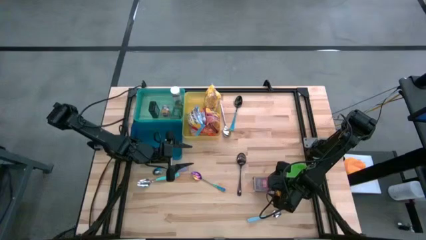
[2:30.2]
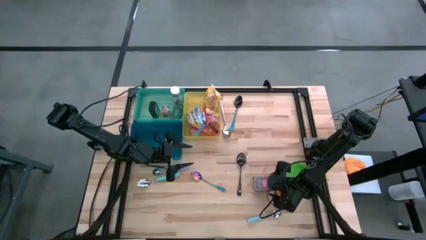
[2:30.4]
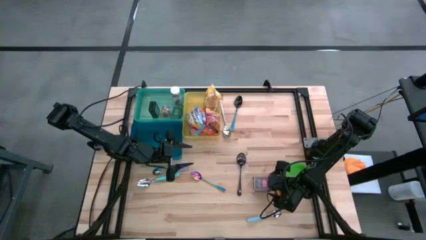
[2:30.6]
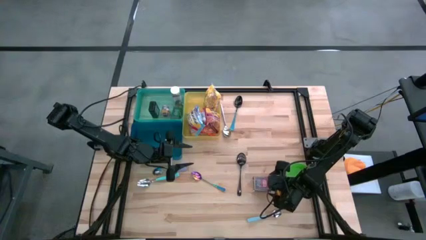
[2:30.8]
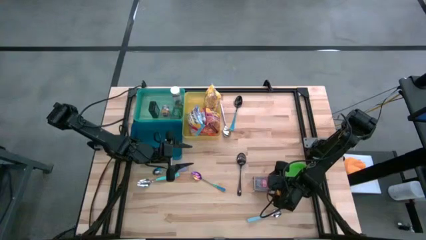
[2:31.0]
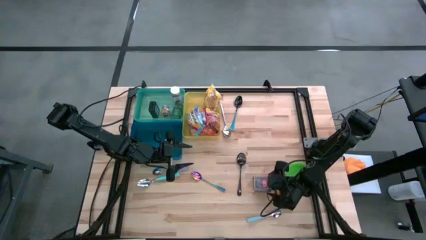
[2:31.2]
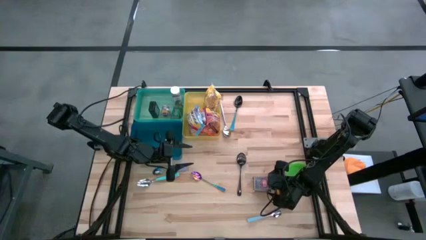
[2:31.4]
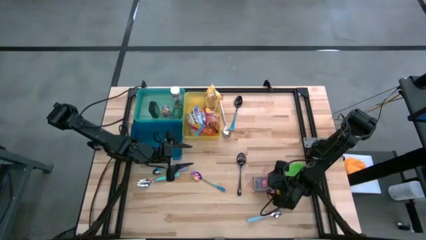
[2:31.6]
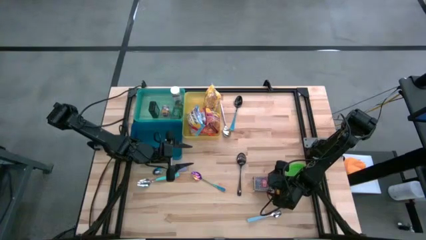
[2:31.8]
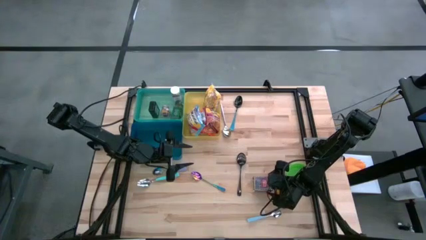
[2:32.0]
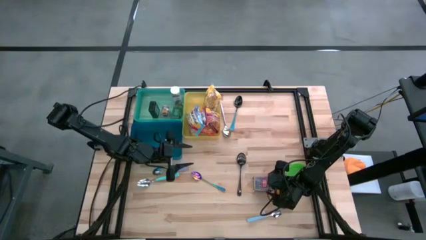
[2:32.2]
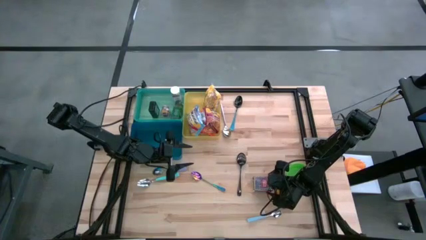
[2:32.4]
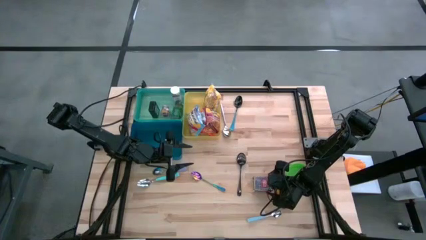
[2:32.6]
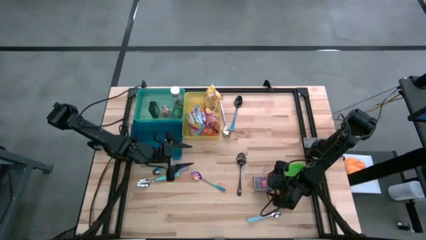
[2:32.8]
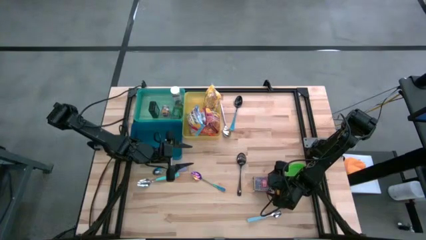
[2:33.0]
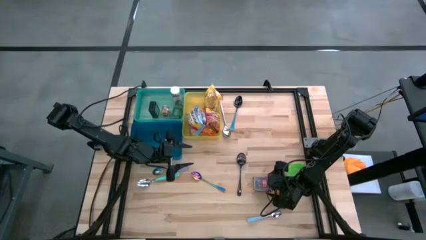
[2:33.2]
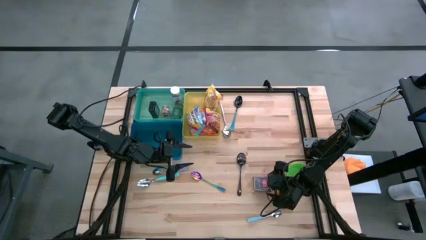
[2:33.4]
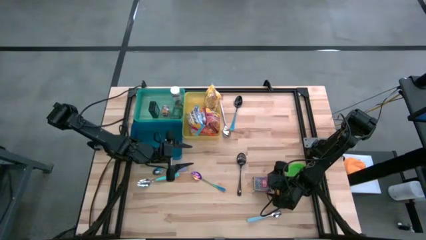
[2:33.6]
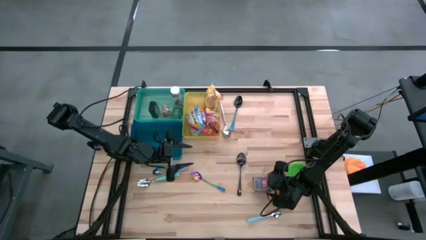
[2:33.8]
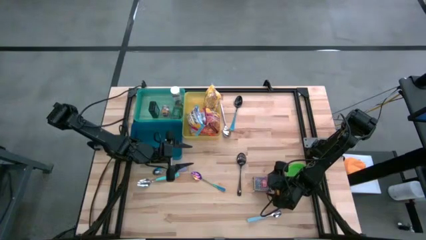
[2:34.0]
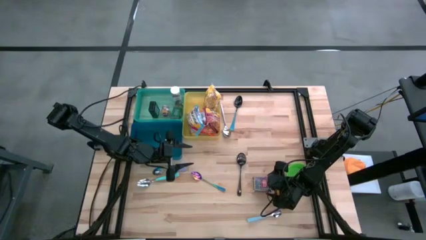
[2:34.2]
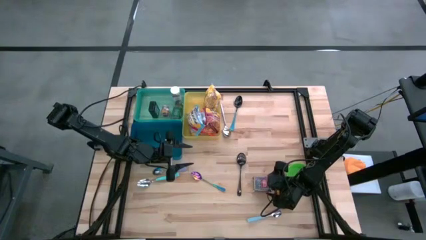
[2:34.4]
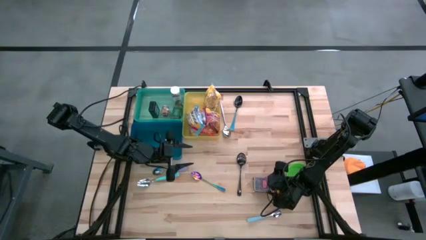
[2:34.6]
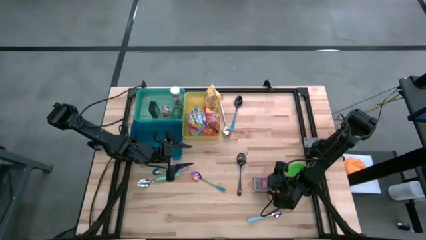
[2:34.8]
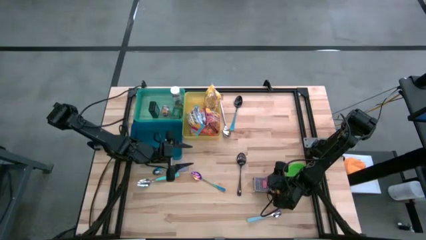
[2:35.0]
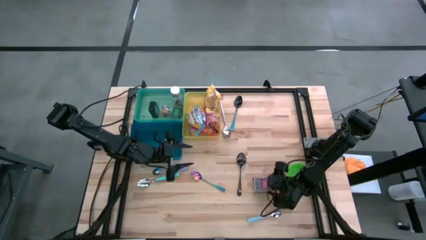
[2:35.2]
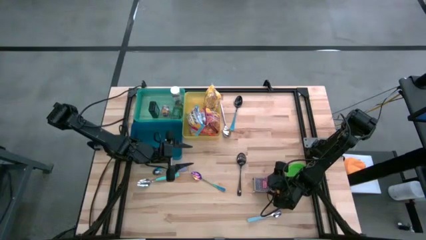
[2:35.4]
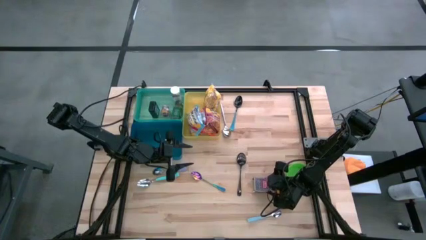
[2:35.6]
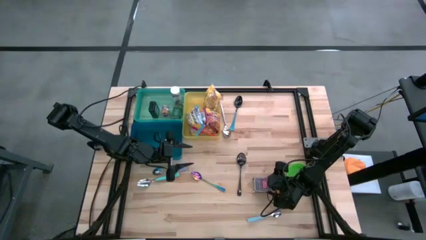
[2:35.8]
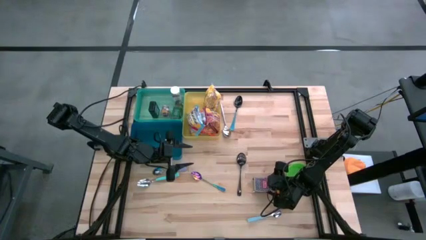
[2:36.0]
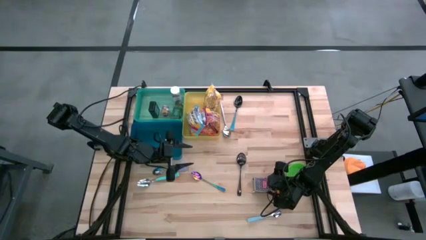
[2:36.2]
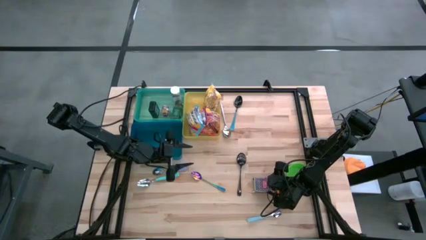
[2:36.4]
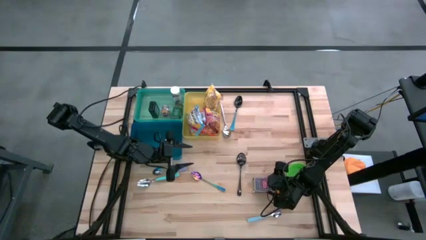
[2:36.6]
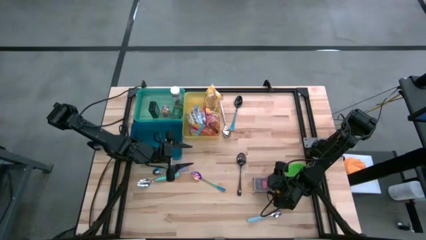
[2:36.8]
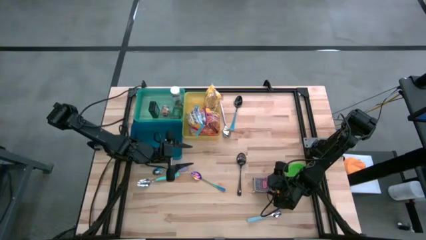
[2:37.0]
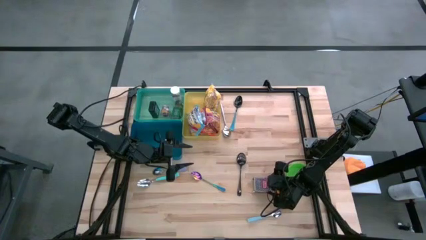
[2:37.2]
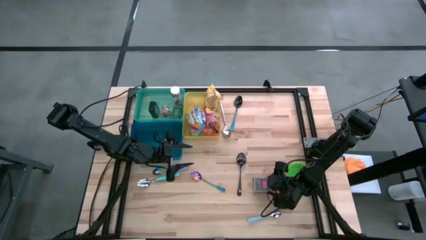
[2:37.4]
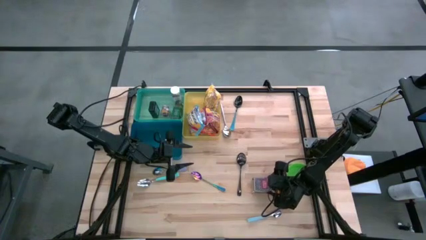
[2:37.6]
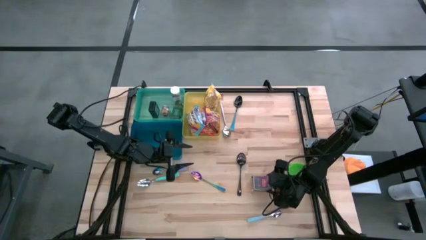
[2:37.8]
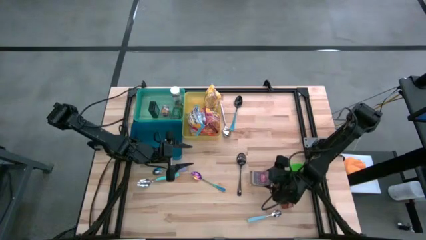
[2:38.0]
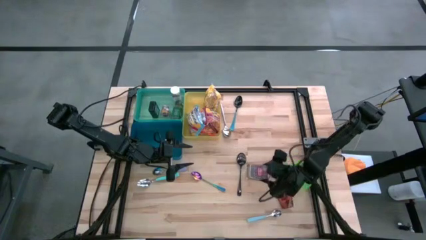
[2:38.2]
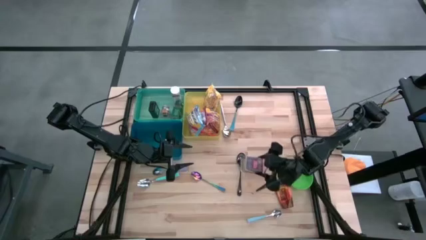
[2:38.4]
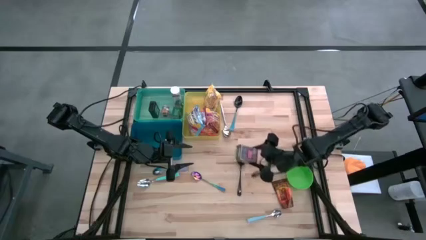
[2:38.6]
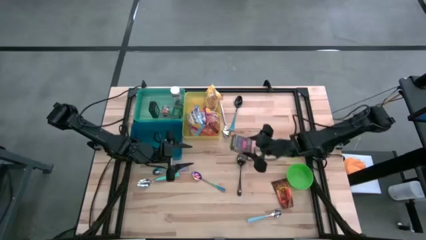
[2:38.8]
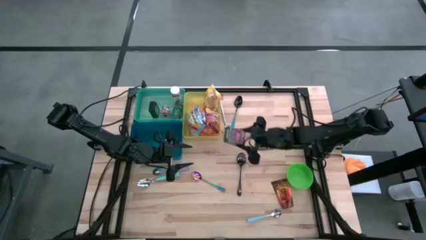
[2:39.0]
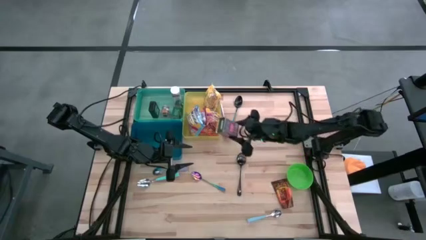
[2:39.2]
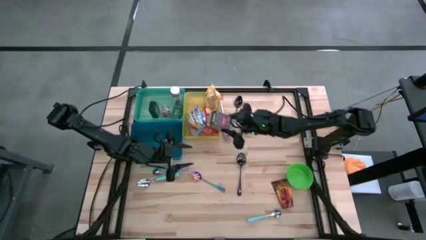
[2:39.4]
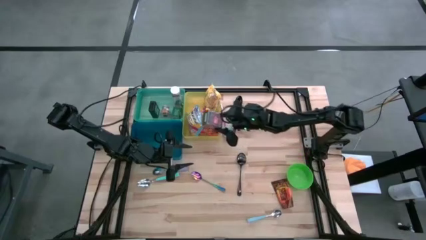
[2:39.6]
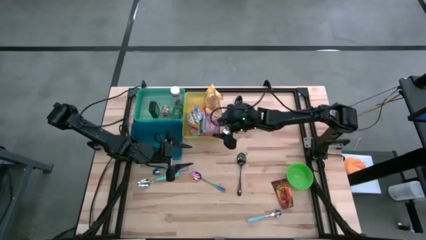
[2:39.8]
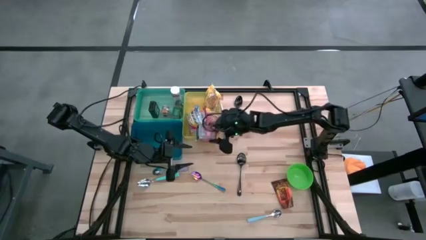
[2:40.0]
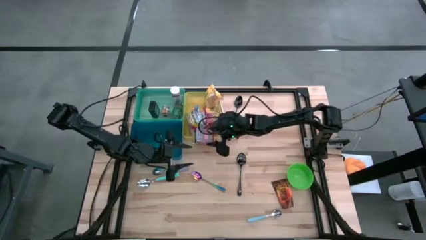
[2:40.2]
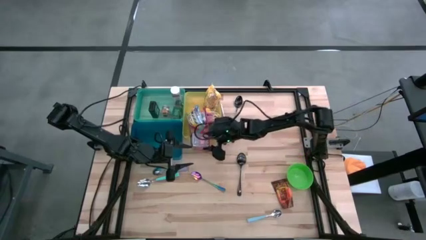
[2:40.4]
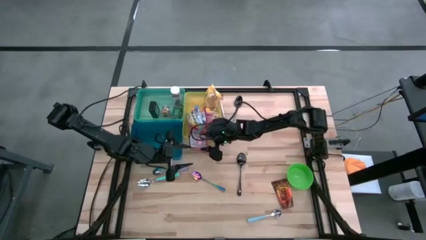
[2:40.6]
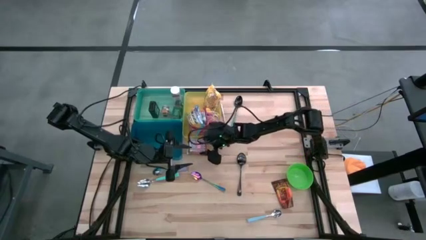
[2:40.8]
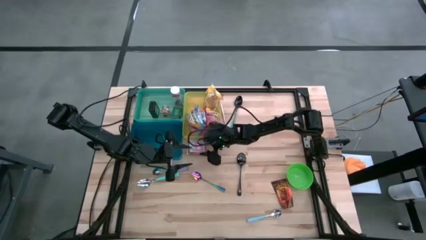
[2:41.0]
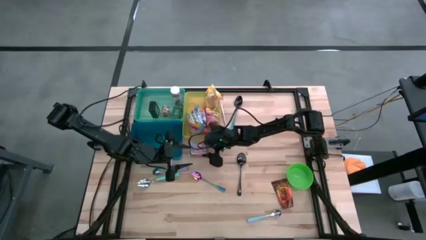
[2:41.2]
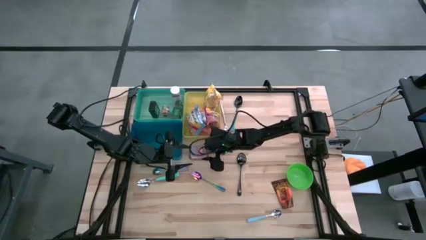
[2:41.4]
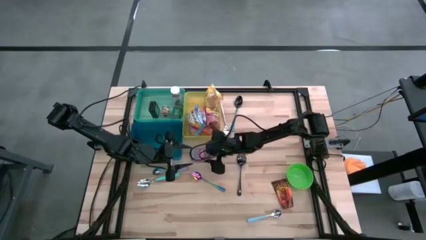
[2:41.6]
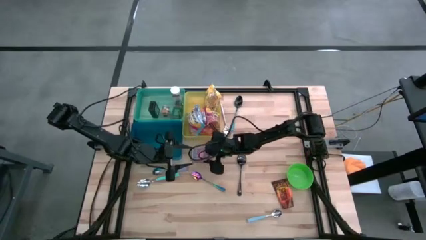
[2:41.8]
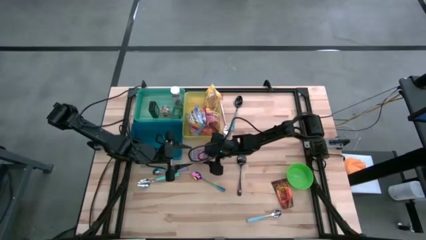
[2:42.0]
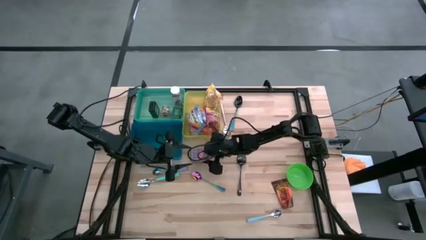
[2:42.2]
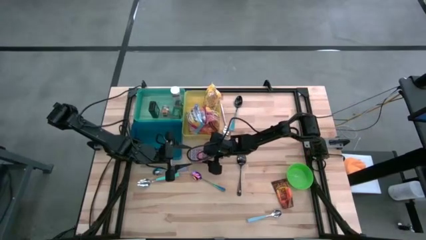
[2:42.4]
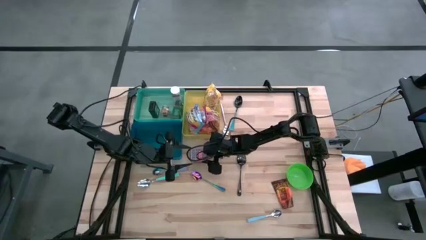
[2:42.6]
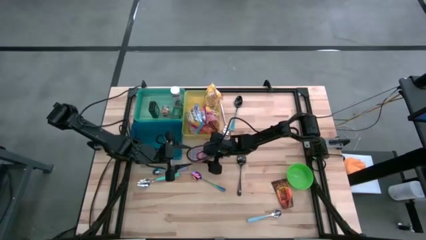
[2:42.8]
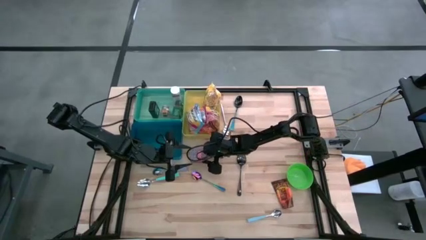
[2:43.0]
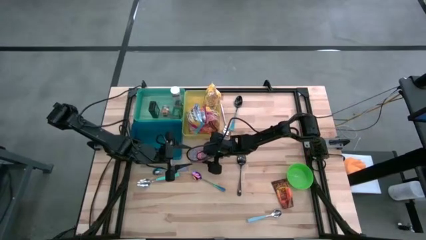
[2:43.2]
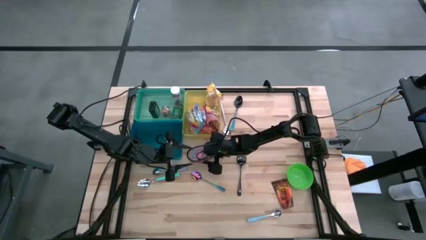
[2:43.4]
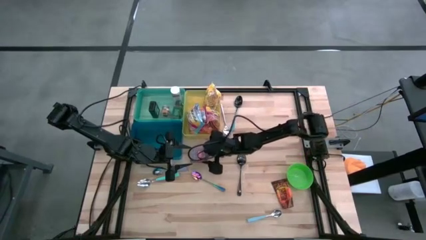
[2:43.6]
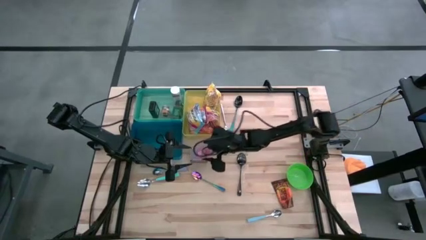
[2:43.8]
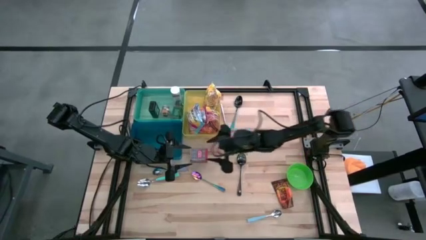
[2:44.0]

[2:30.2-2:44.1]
Put the red spice can into the green bin
